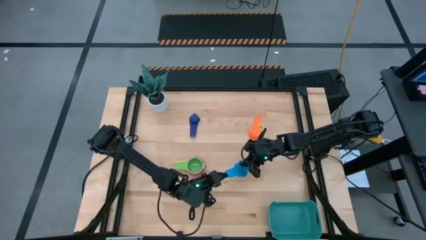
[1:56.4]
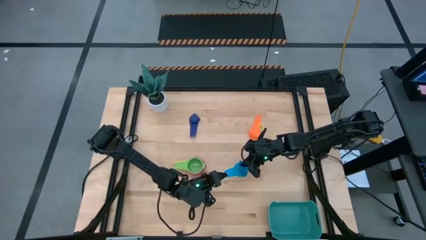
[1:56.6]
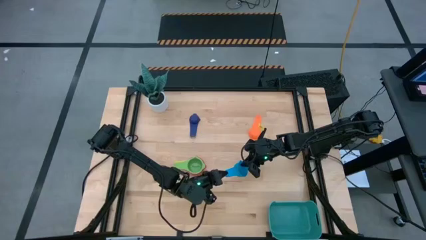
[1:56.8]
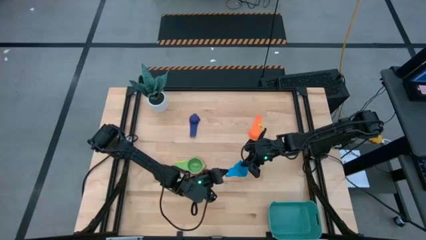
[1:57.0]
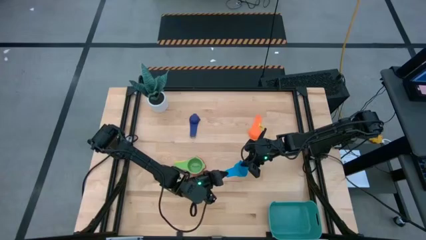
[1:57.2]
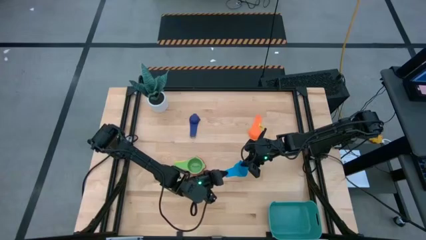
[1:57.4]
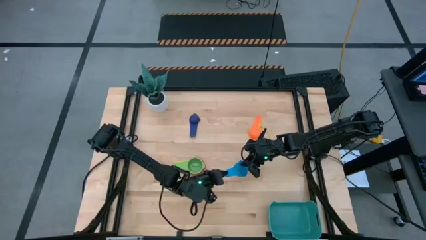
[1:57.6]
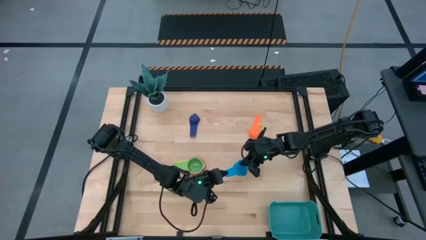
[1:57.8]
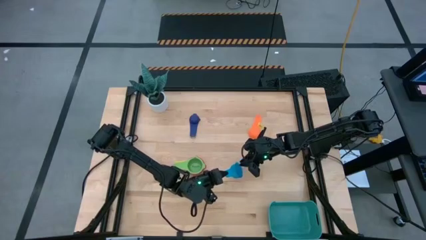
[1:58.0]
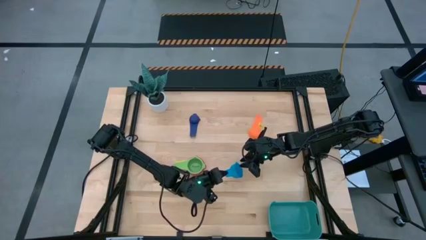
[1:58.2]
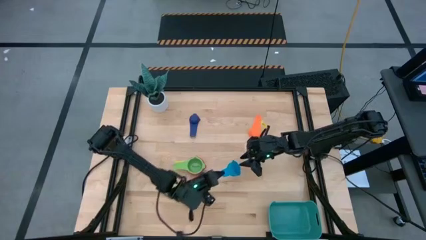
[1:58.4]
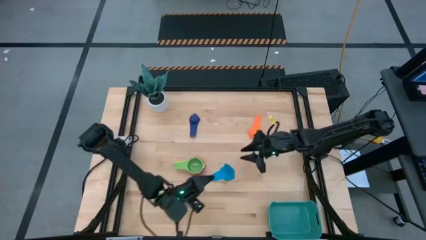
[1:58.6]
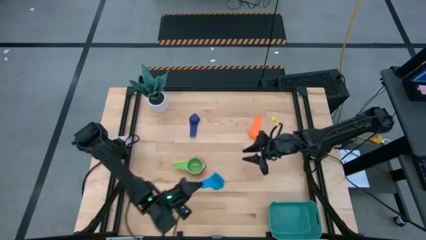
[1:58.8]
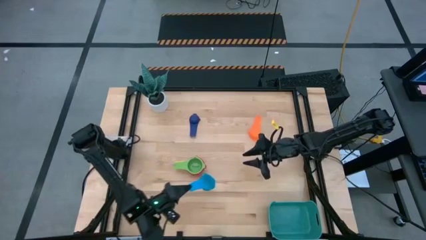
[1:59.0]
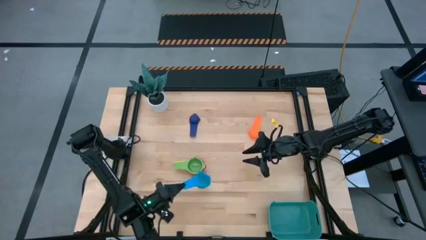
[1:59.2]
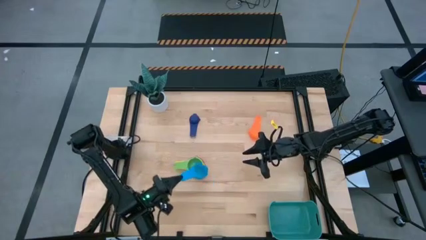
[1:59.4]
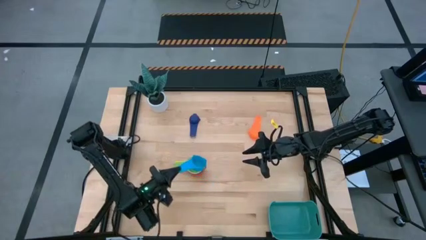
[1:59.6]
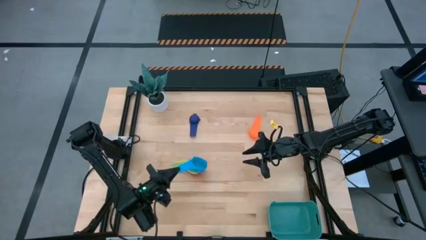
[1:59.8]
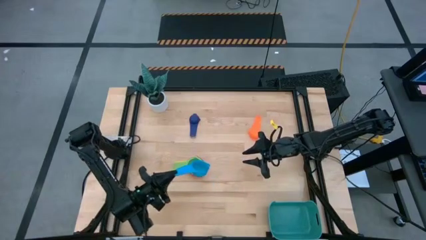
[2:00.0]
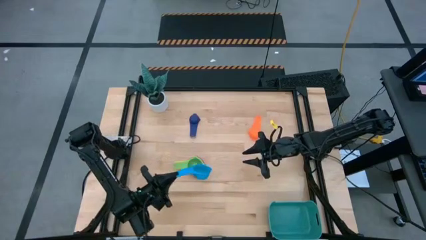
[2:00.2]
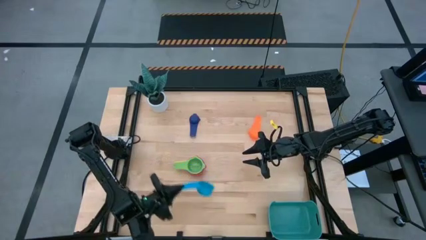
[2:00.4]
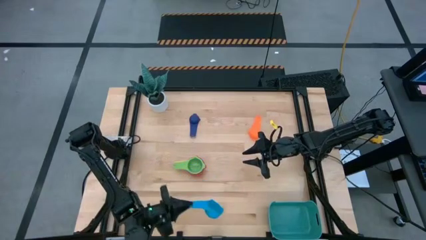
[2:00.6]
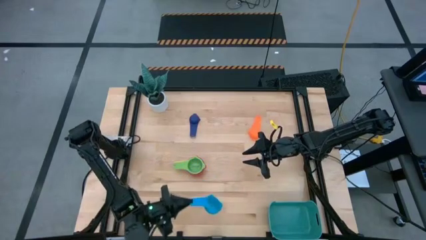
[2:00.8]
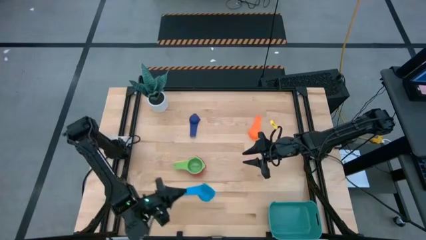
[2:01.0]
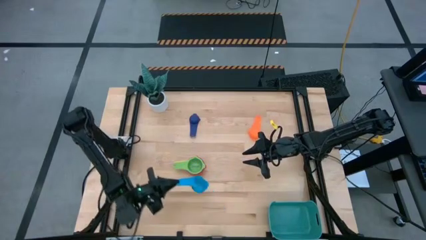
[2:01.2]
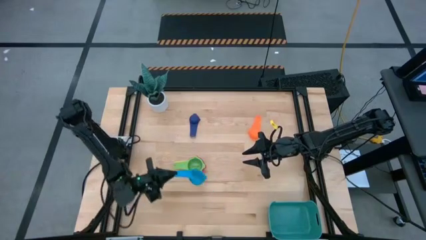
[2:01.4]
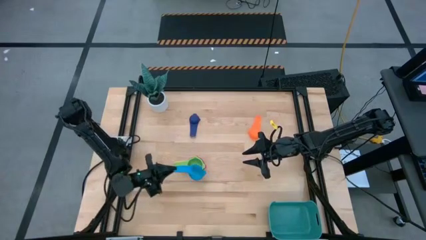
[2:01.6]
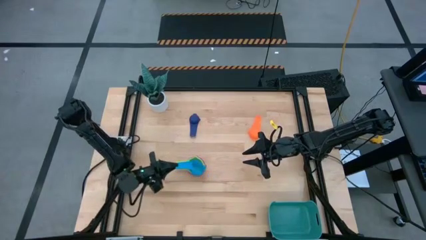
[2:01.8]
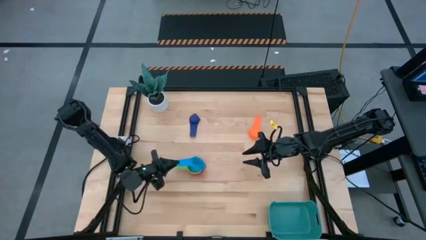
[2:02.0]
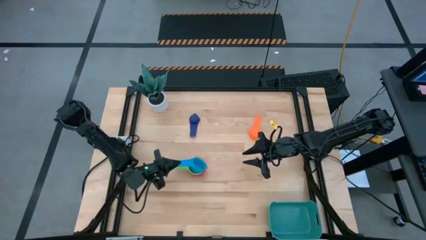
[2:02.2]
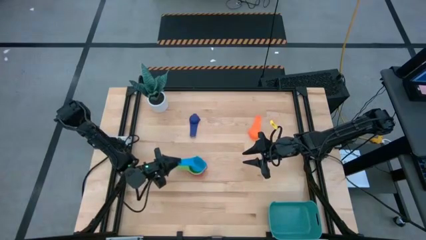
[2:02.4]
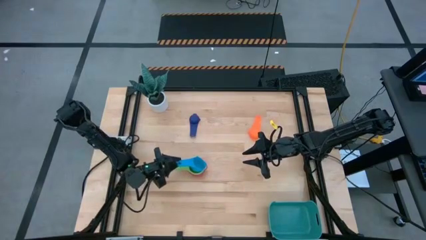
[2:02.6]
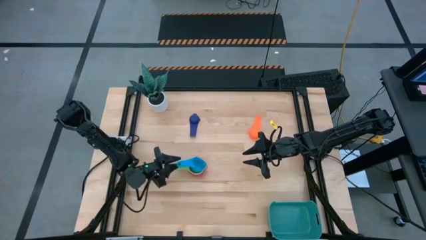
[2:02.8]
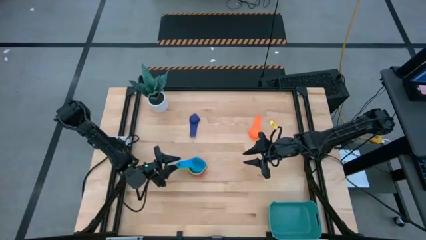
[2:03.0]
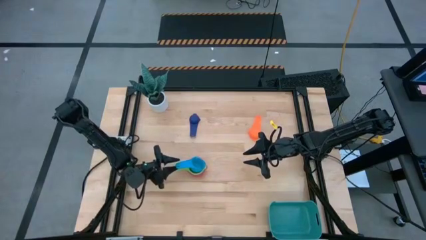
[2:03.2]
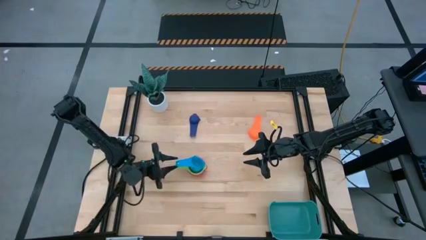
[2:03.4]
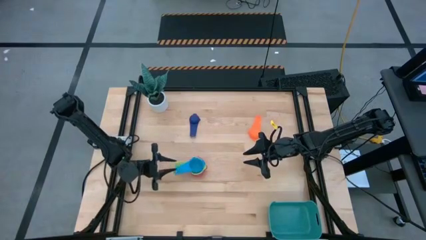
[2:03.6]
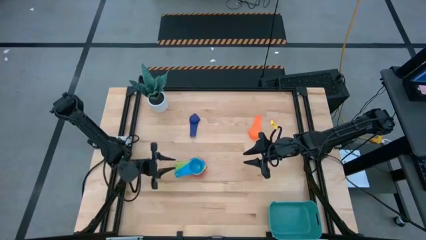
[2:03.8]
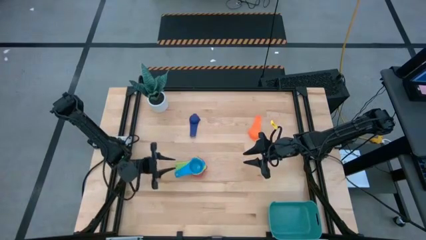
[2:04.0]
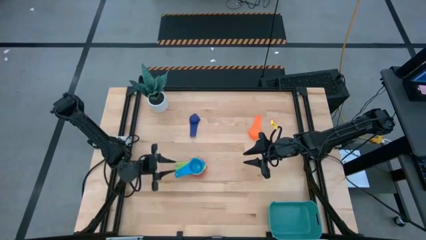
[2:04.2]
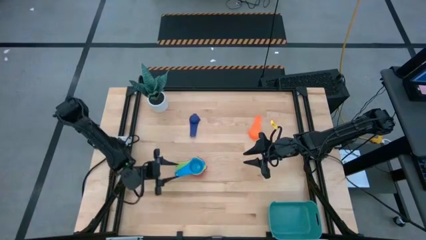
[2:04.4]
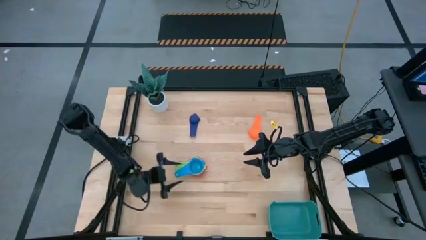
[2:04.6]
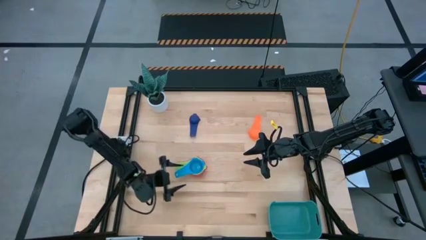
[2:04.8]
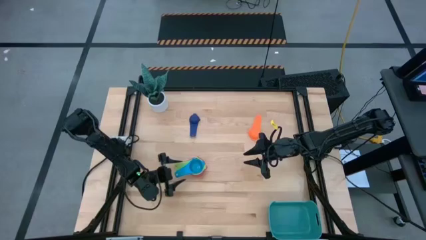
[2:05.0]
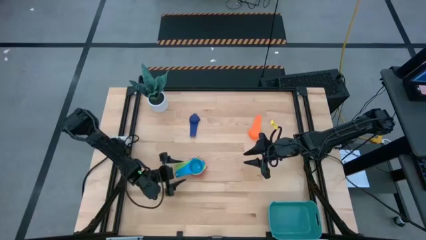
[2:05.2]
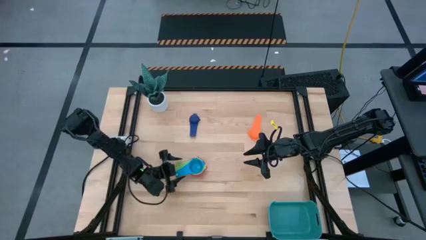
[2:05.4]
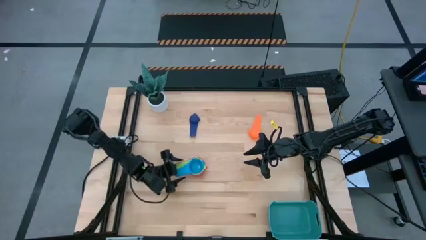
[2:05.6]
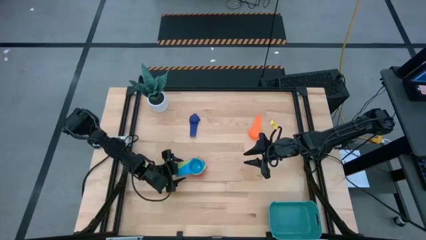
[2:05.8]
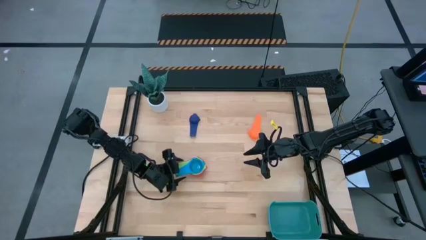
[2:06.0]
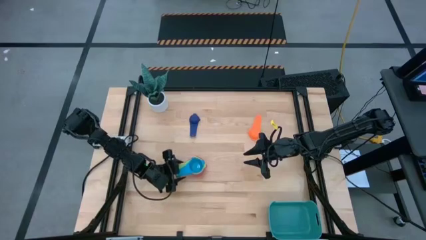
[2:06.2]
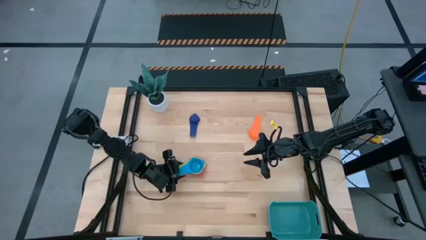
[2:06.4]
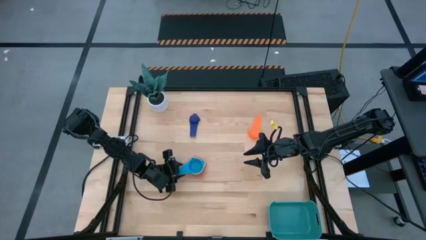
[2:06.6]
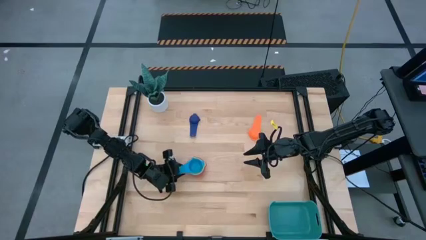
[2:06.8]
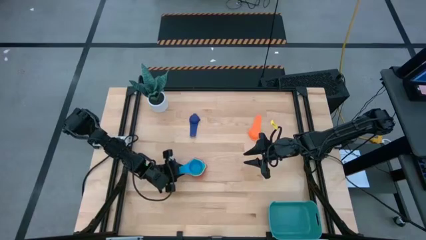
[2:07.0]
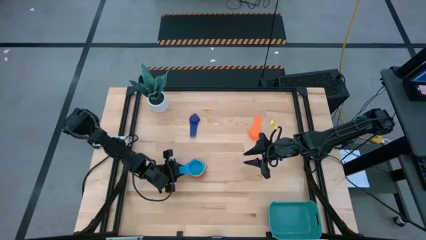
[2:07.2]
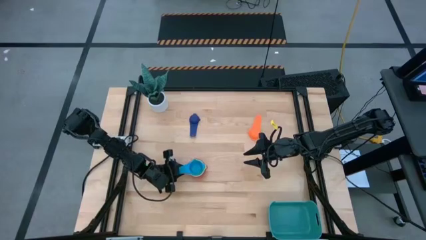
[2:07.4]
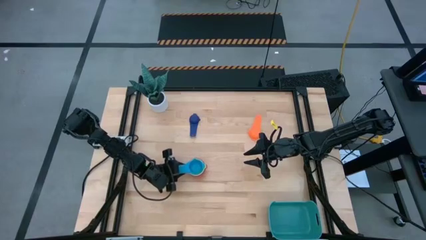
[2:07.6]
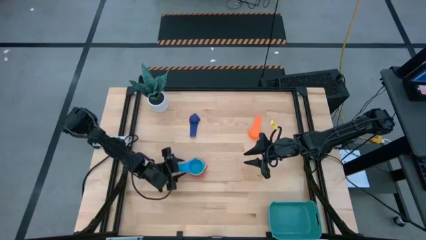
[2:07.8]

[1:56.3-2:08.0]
Task: Nest measuring cups in basket
Stack the light blue measuring cup on top of the green measuring cup

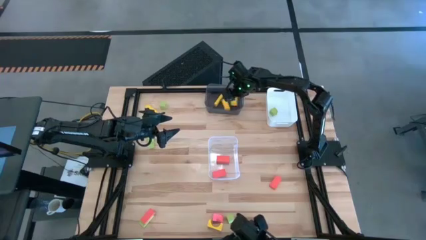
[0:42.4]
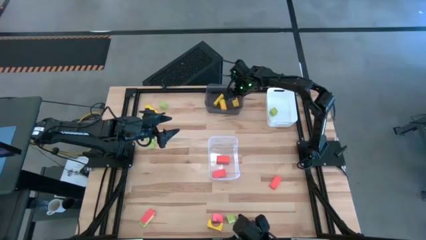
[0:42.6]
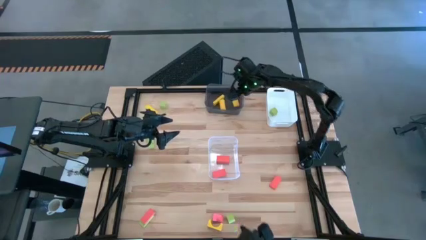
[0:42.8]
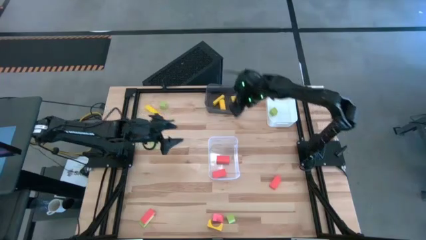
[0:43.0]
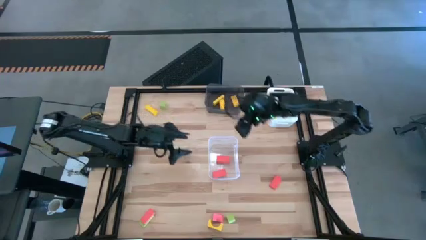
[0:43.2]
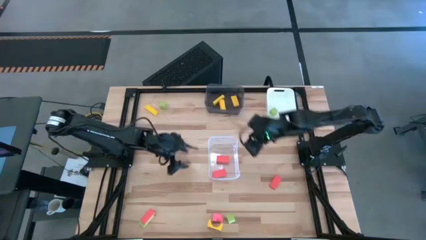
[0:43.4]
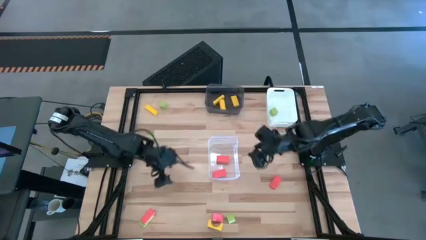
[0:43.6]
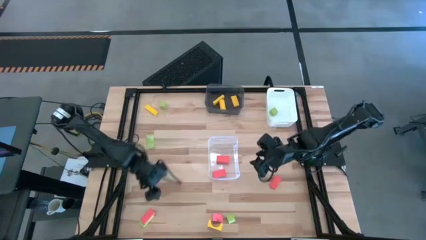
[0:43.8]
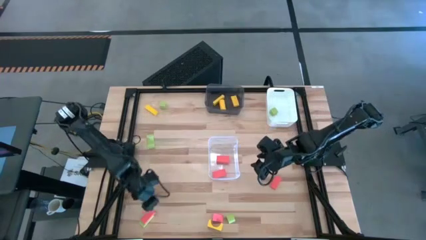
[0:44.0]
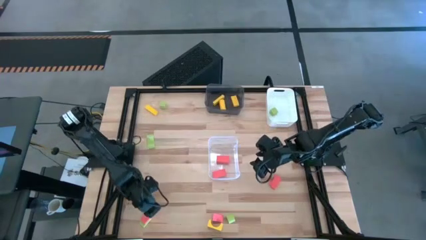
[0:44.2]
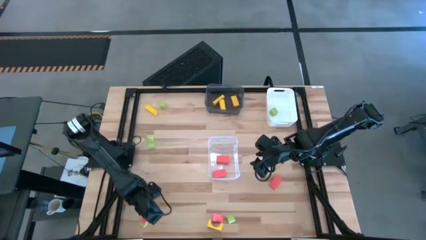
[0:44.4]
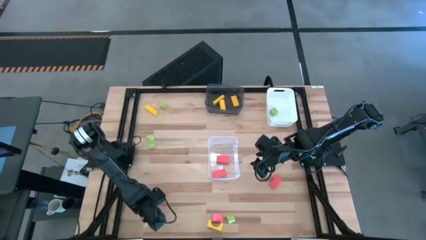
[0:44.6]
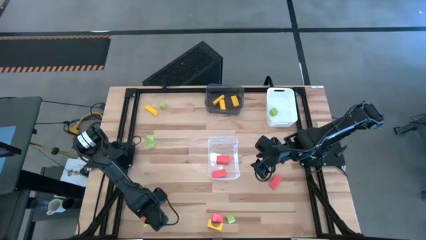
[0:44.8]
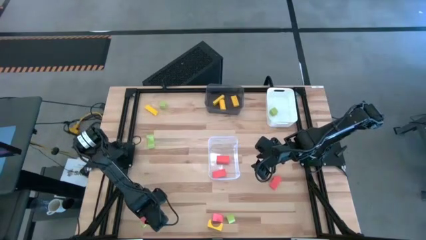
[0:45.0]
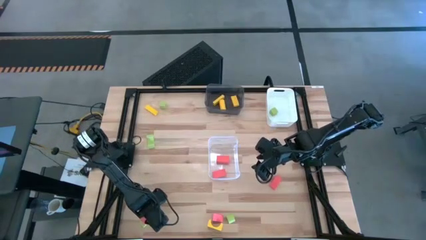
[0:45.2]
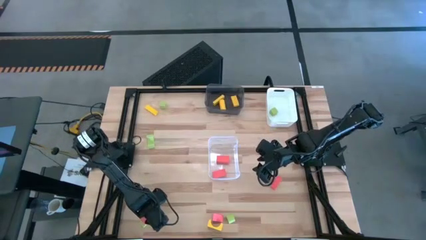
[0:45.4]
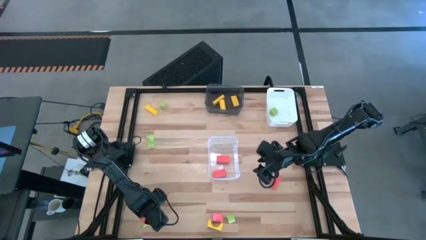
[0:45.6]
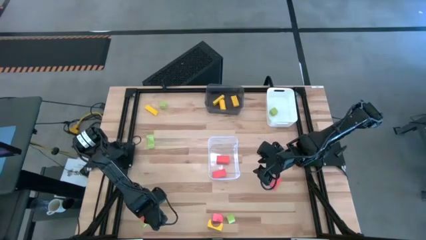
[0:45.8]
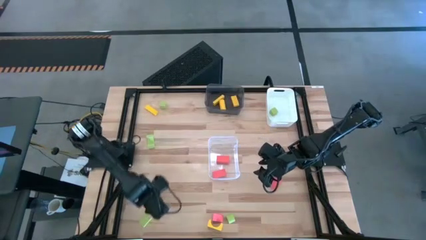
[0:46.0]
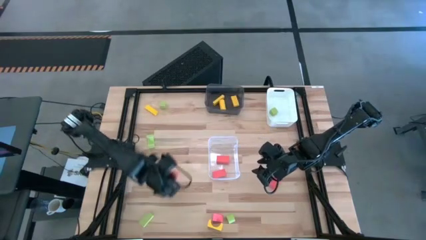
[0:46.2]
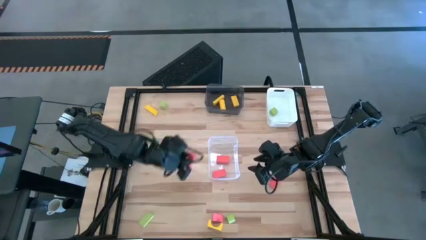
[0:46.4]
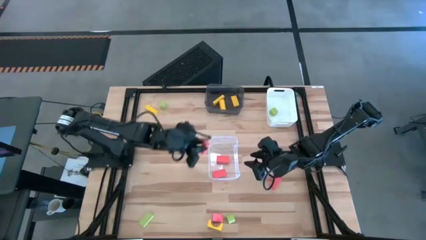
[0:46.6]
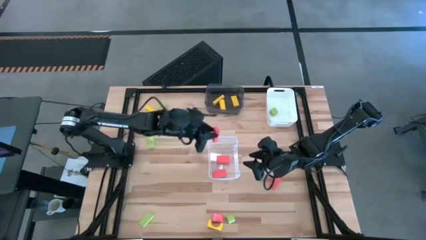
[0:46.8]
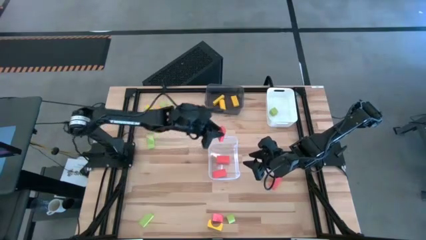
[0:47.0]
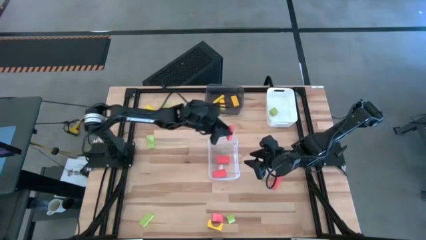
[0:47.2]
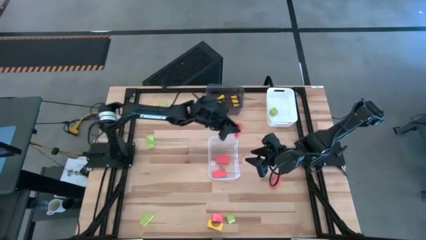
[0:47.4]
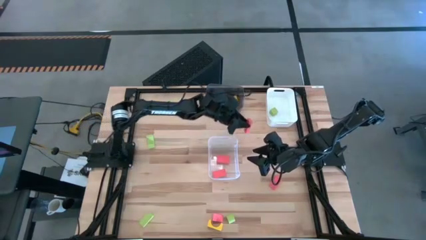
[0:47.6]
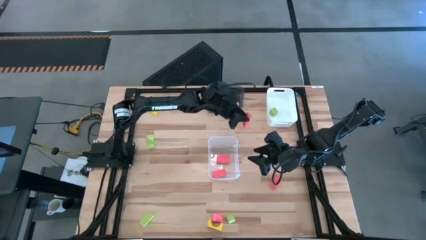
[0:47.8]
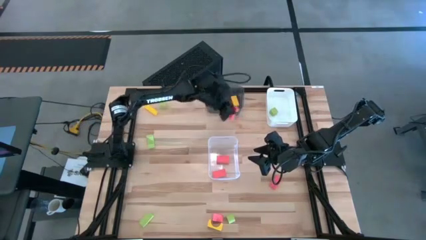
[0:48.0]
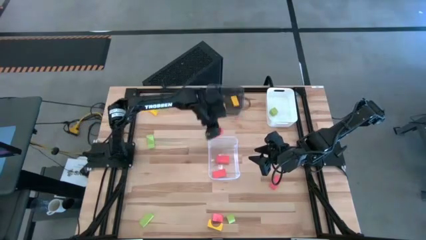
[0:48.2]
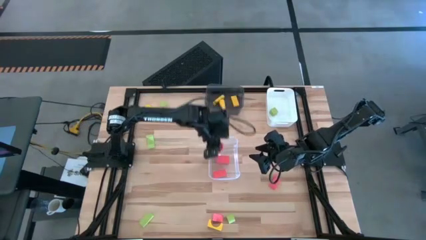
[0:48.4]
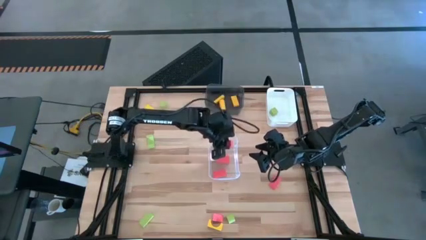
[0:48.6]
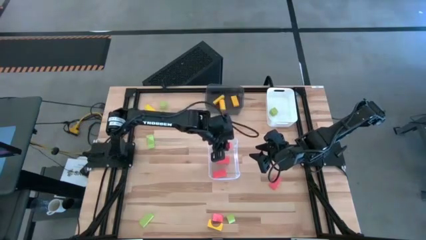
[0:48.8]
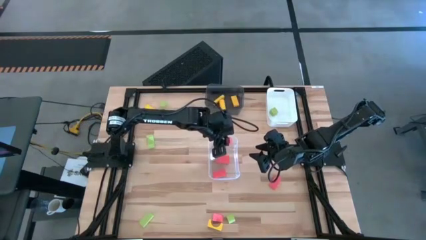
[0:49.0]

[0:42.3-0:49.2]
Task: Sort & place blocks by color
Put the pink block into the transparent bin
